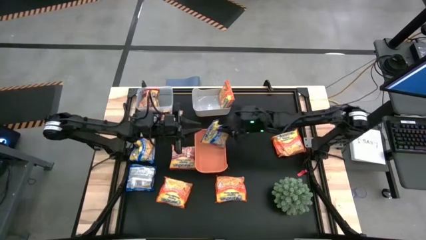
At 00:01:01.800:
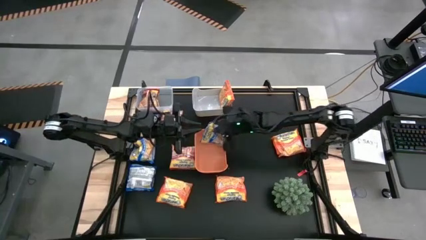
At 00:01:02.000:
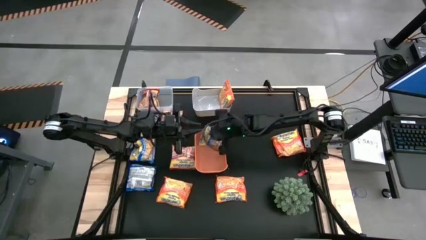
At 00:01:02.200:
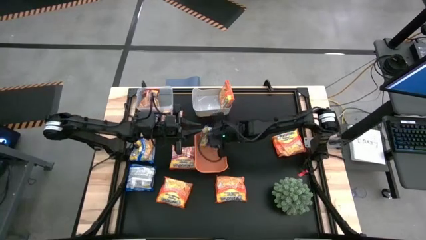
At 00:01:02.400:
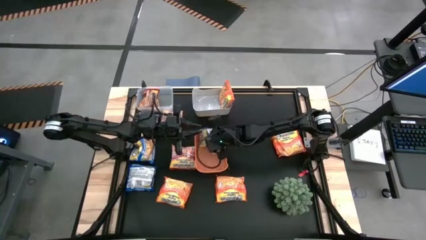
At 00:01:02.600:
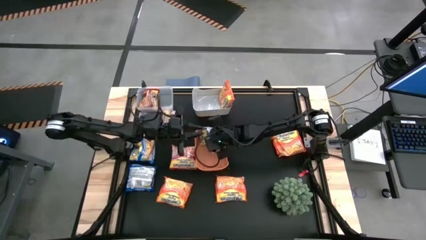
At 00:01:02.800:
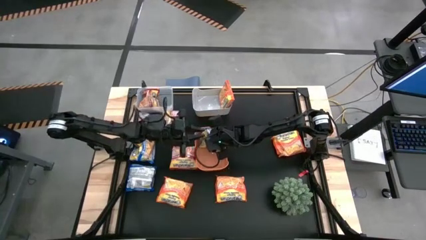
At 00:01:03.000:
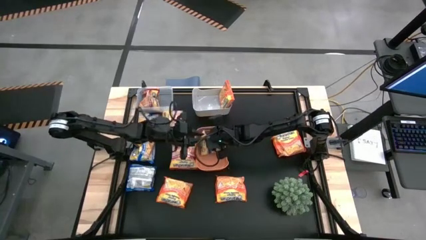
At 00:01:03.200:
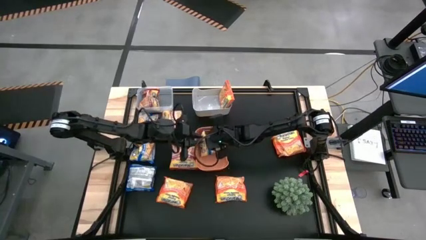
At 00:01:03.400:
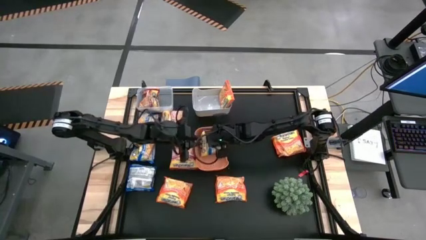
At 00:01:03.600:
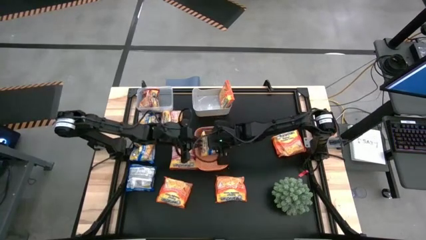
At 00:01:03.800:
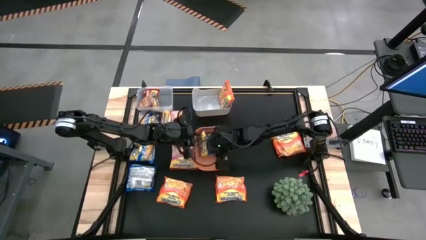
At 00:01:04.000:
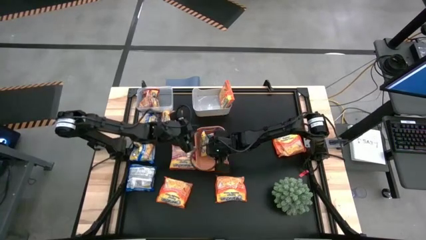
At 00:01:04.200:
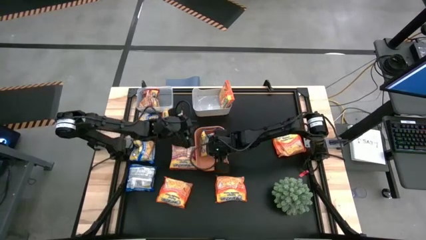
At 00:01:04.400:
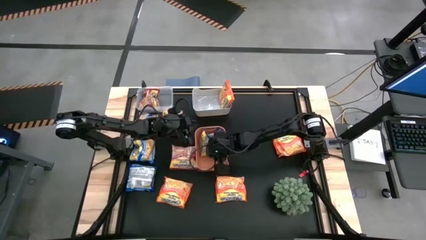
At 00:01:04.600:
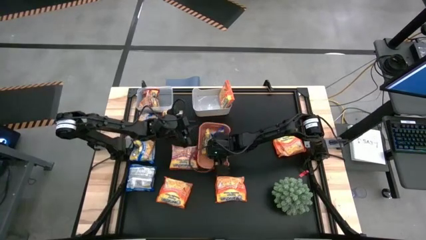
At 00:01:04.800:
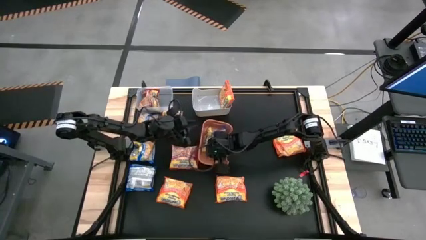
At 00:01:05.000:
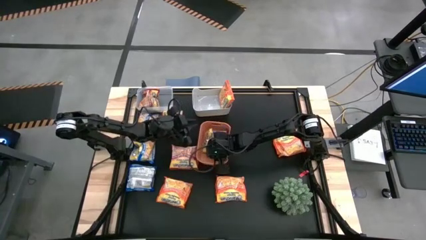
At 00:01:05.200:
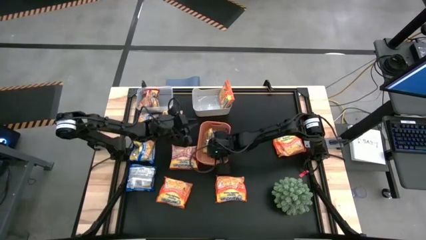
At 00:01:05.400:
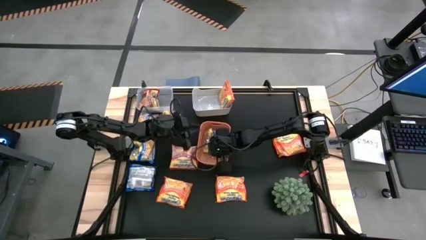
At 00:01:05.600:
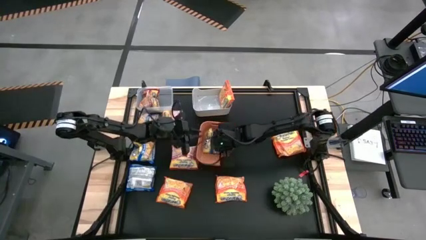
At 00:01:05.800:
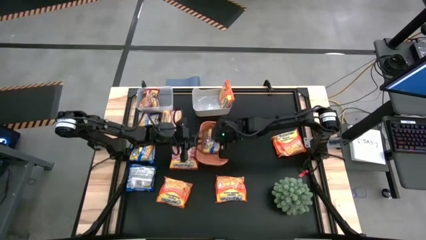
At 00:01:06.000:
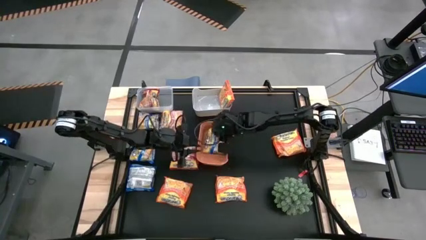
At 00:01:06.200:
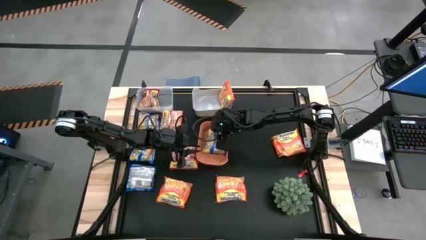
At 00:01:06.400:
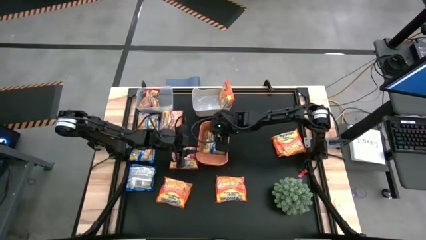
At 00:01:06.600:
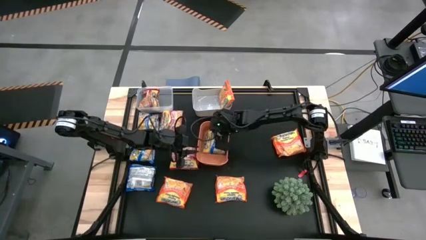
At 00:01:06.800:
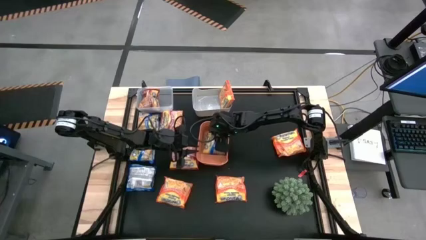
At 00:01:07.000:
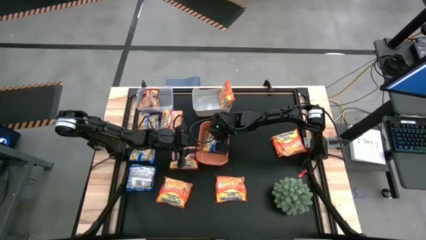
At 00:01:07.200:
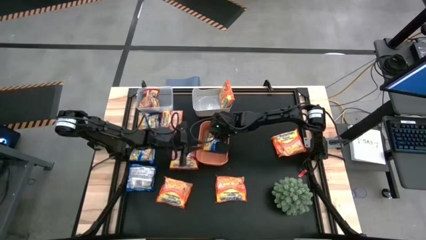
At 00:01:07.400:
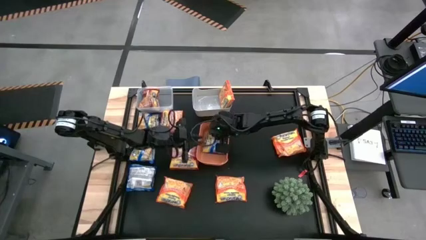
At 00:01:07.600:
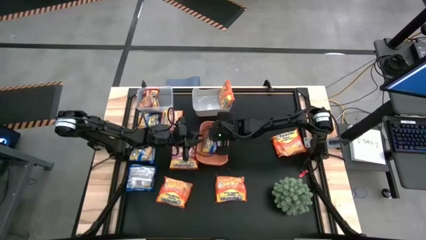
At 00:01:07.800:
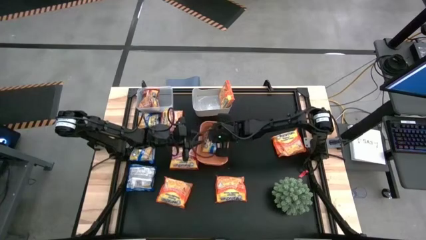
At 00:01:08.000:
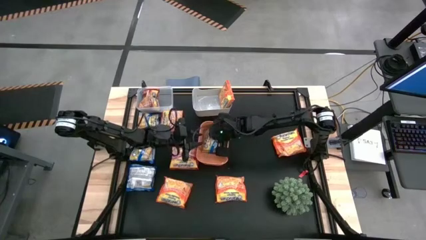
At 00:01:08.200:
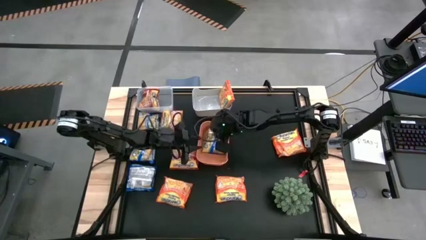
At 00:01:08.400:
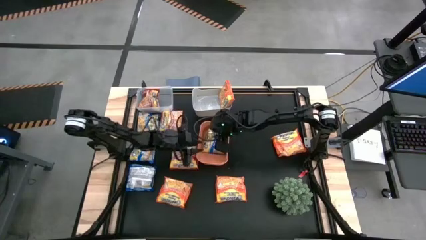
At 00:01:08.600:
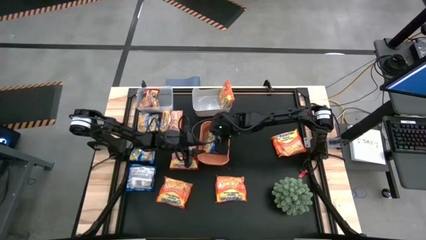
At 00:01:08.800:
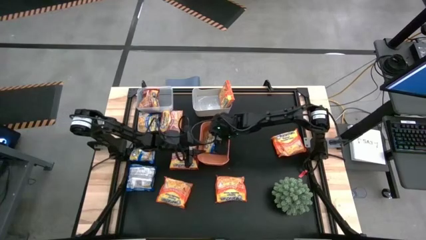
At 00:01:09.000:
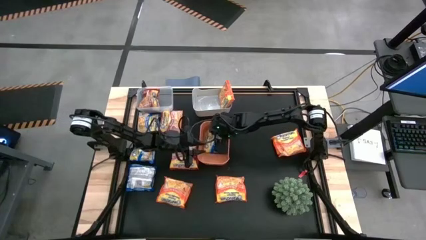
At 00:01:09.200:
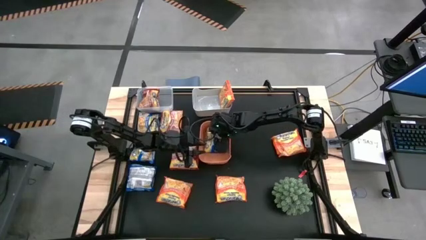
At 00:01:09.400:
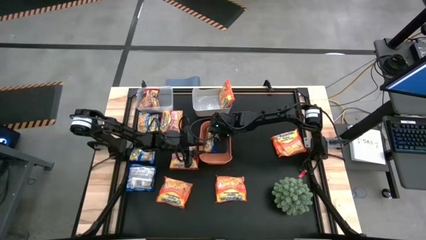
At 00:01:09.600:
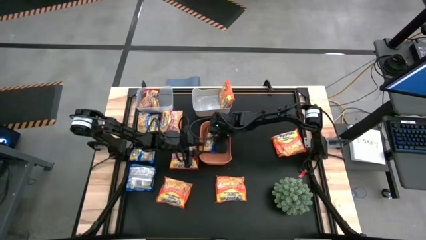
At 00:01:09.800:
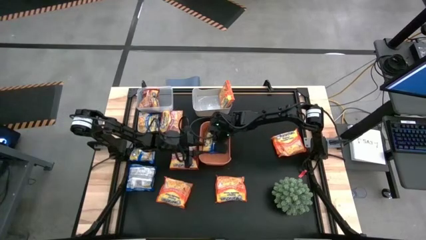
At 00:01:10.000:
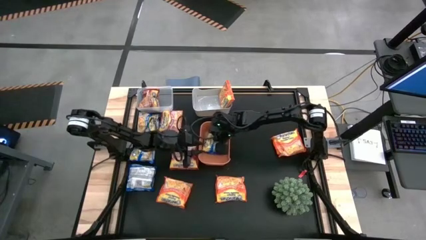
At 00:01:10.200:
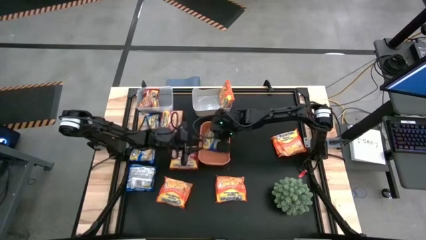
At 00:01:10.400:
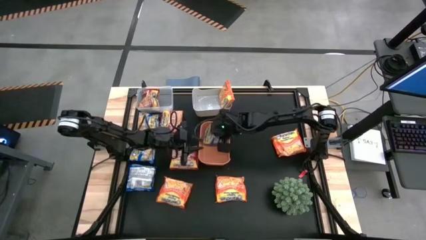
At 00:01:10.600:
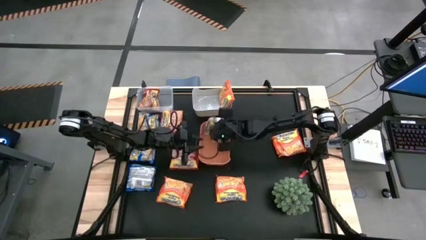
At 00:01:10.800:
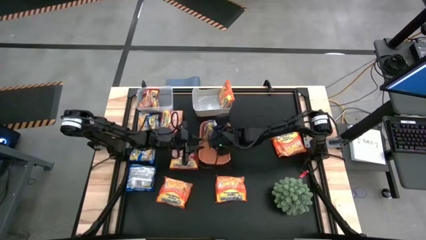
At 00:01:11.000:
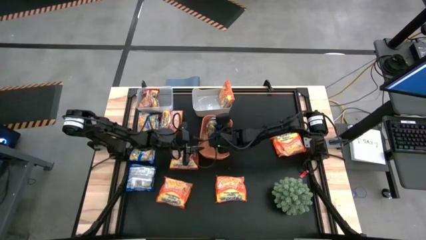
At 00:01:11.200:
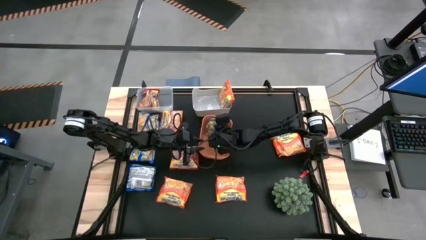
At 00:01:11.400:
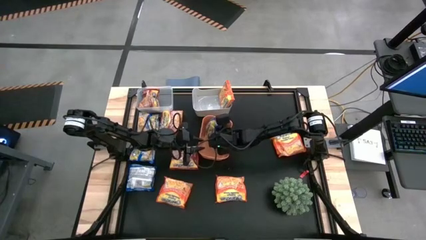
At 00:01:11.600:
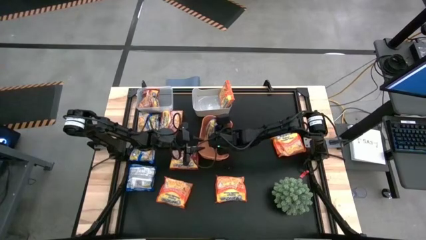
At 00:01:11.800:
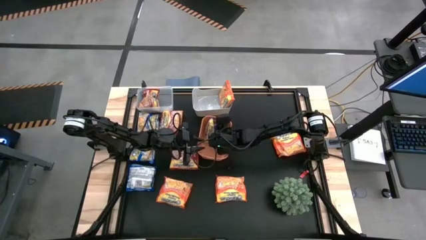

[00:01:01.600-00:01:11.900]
Task: Sort Maruchan noodles
Put the blue bag into the orange bin

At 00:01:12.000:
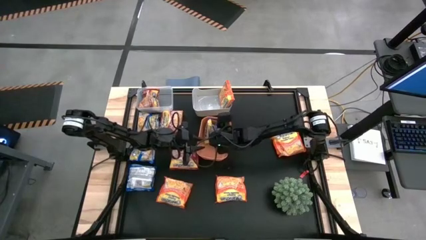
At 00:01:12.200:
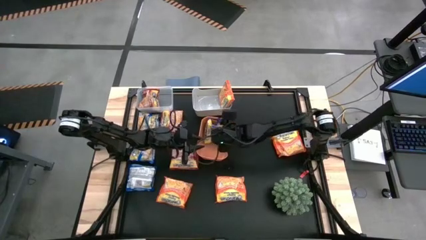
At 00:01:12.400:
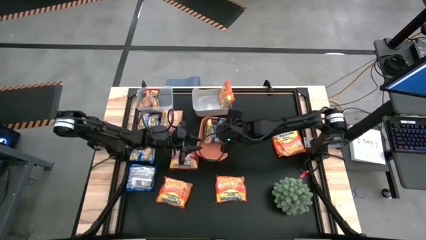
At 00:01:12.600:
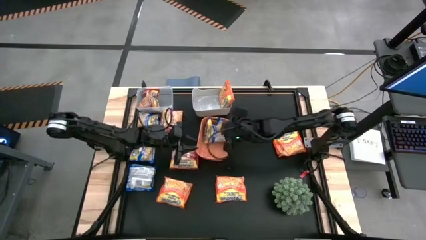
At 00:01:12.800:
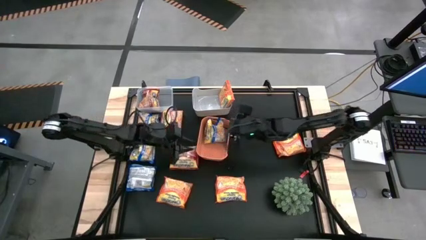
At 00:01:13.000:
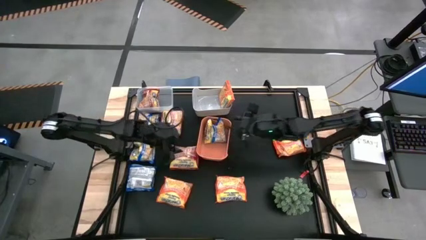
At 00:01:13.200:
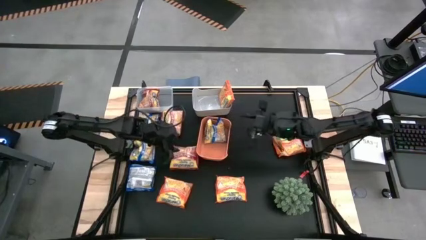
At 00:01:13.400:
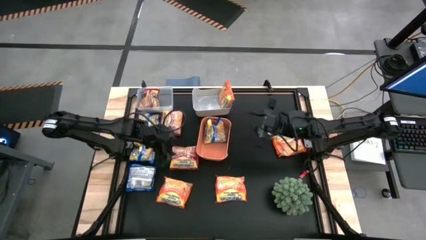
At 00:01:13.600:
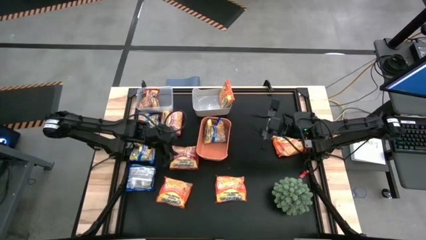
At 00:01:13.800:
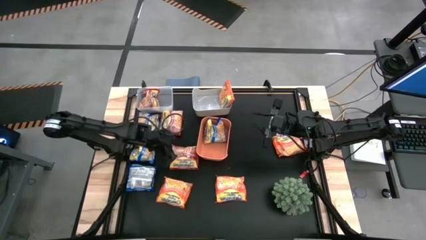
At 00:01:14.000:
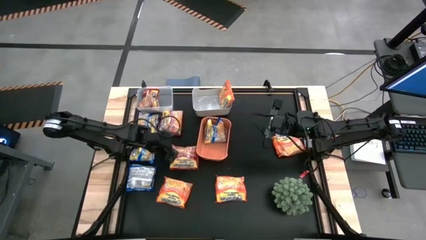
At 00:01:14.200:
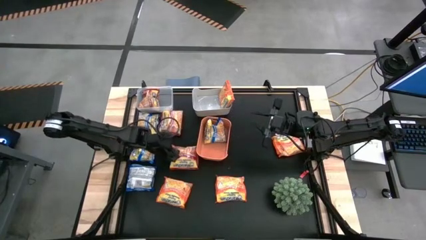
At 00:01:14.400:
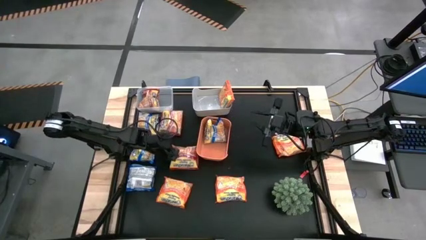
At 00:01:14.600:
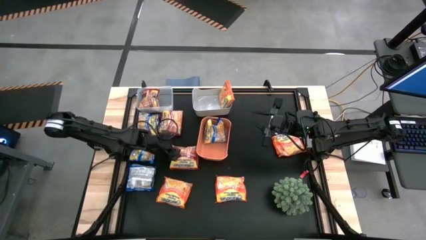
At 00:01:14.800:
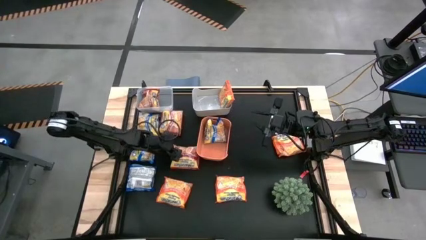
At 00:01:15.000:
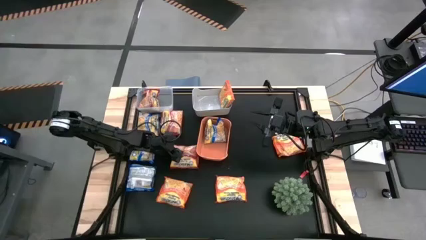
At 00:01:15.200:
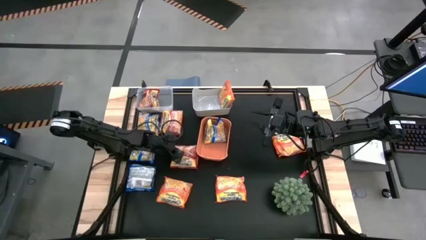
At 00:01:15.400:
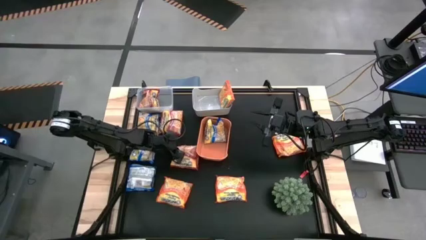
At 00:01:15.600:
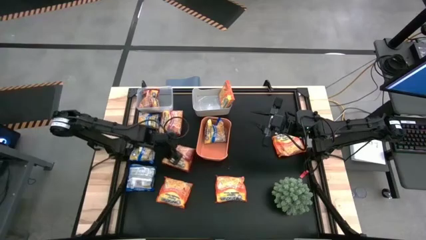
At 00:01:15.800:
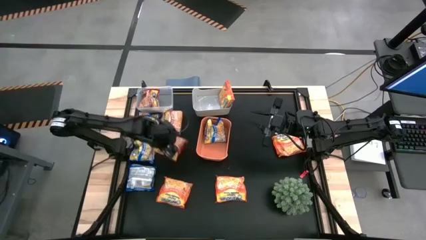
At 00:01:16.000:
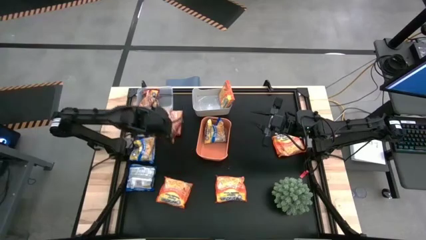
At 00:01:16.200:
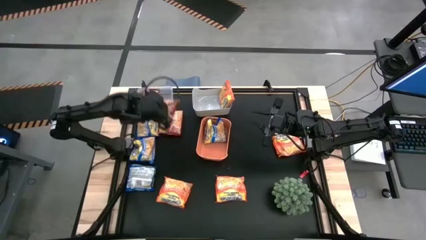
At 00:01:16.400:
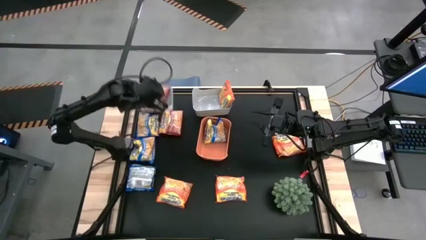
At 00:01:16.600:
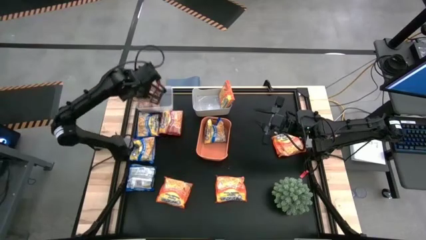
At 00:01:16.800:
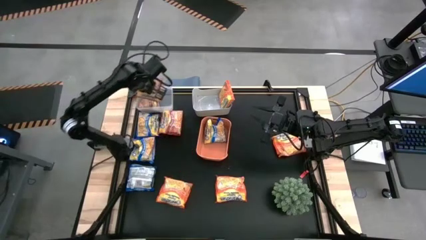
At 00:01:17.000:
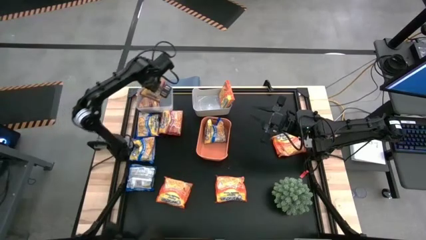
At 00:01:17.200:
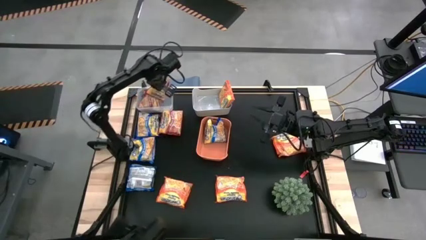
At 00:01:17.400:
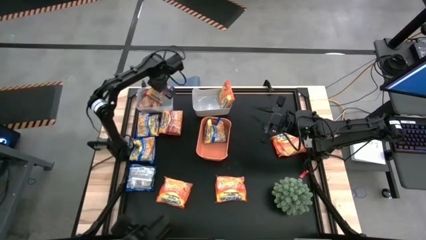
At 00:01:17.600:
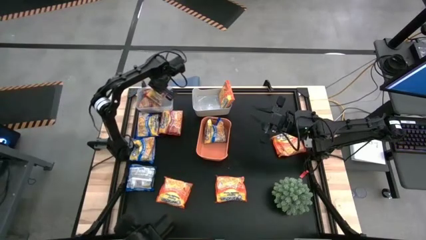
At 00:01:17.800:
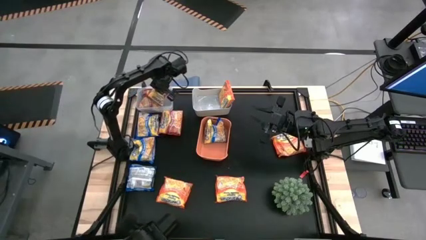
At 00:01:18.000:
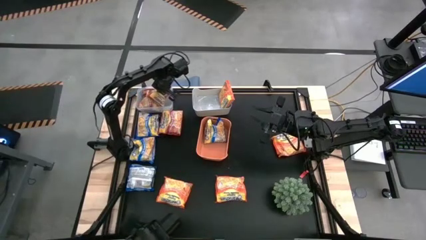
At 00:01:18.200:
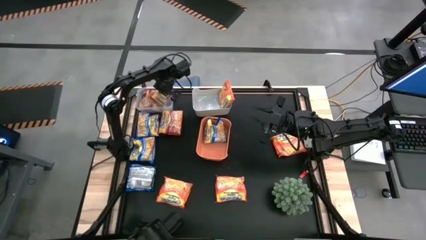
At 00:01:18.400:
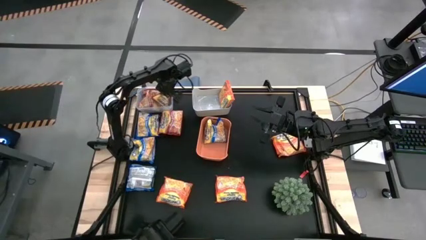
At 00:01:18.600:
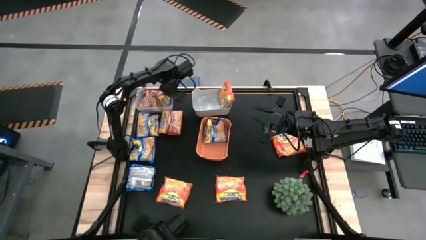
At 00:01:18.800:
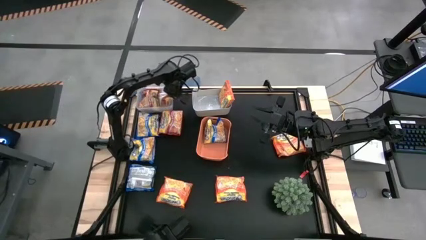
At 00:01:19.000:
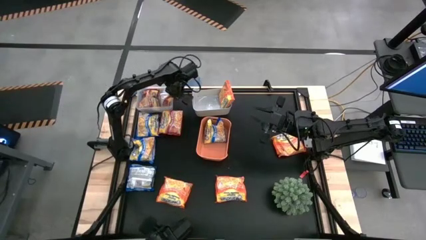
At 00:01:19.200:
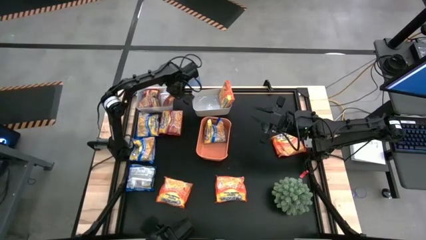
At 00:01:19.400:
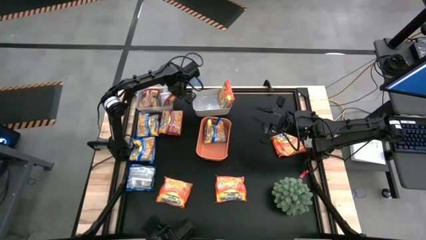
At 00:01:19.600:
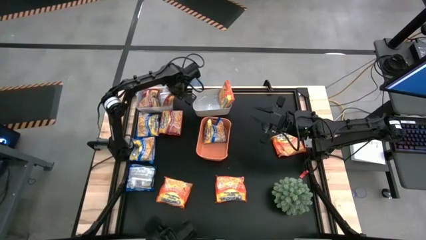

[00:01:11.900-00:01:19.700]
Put the red bag into the transparent bin
